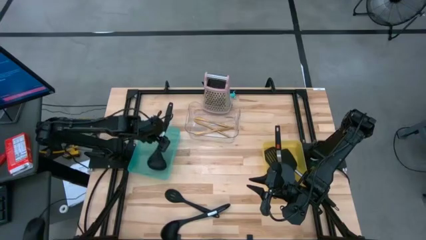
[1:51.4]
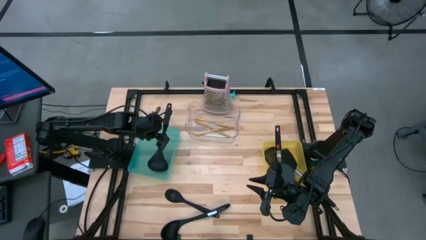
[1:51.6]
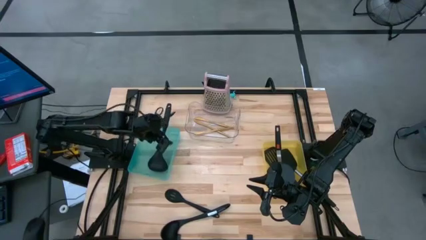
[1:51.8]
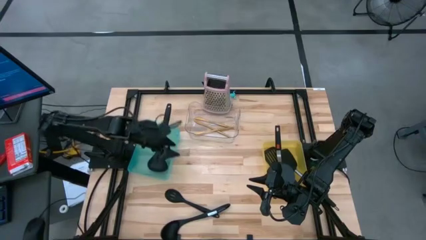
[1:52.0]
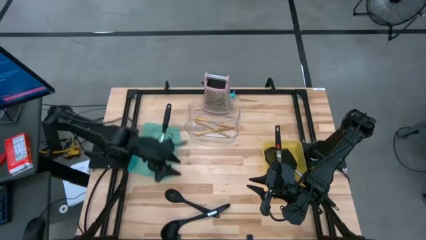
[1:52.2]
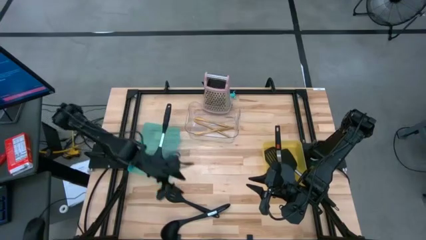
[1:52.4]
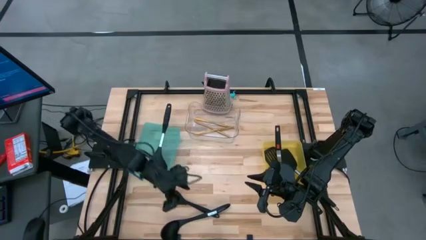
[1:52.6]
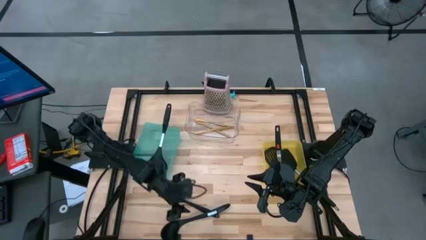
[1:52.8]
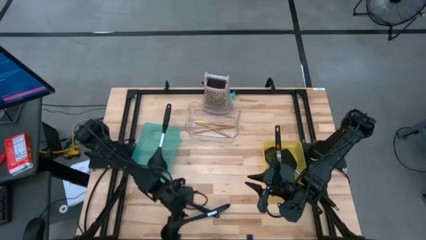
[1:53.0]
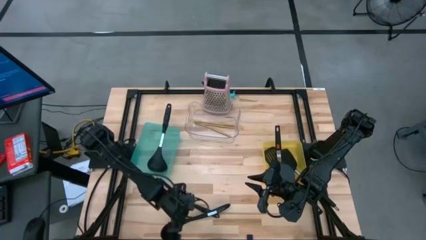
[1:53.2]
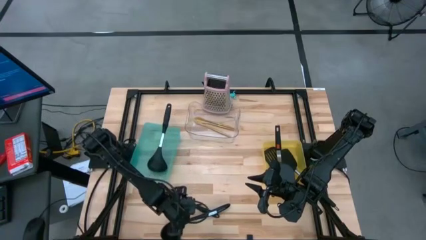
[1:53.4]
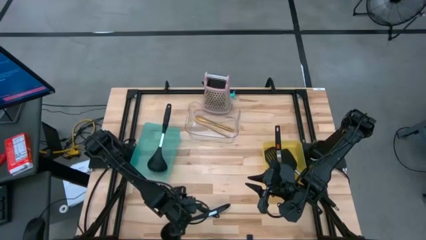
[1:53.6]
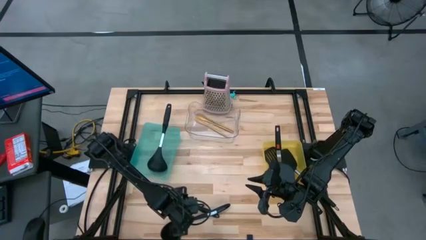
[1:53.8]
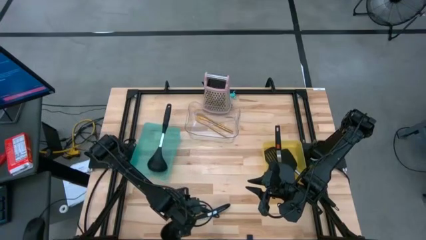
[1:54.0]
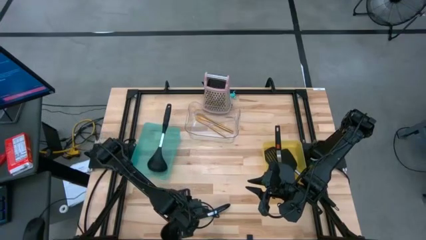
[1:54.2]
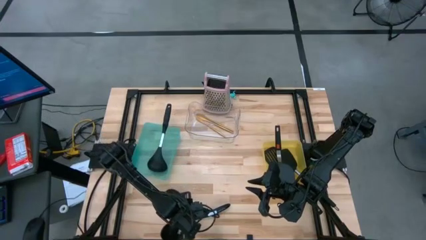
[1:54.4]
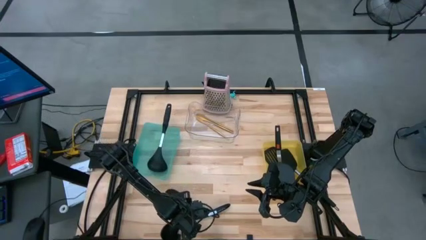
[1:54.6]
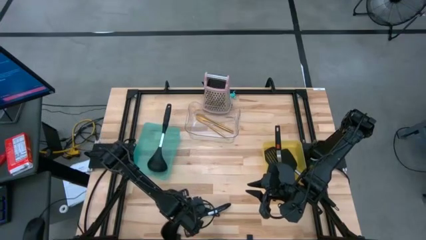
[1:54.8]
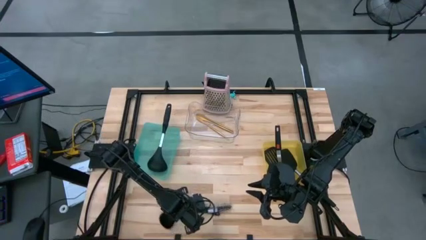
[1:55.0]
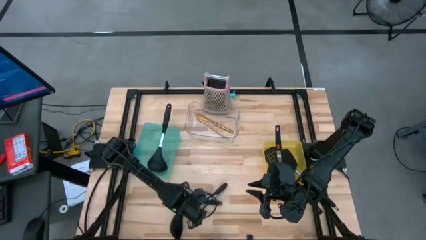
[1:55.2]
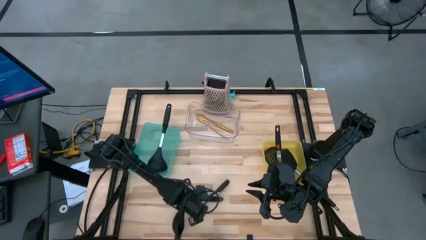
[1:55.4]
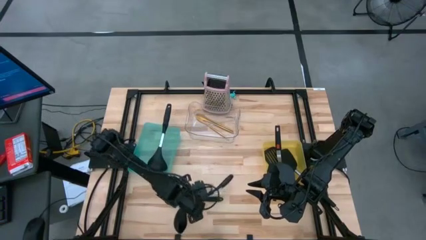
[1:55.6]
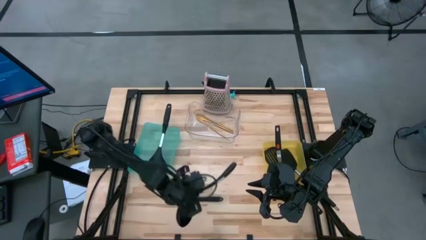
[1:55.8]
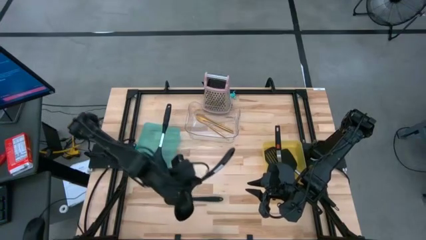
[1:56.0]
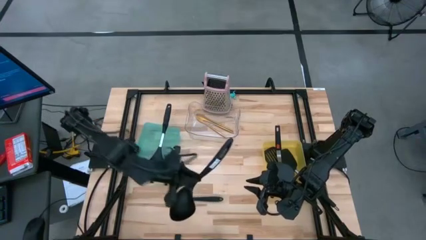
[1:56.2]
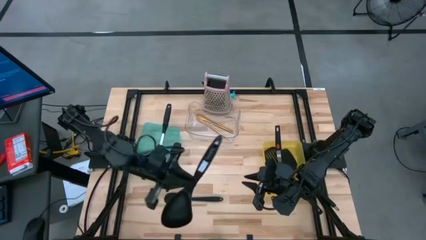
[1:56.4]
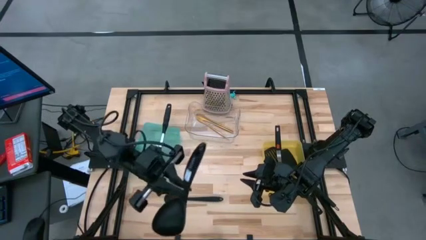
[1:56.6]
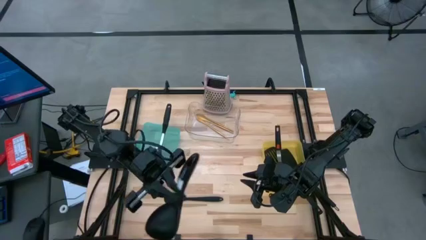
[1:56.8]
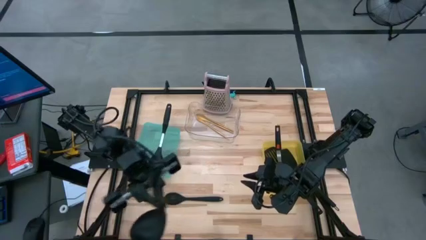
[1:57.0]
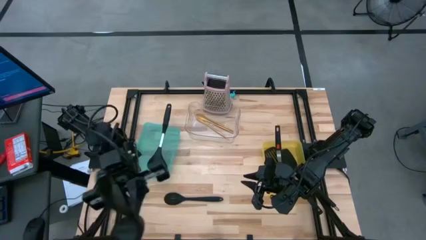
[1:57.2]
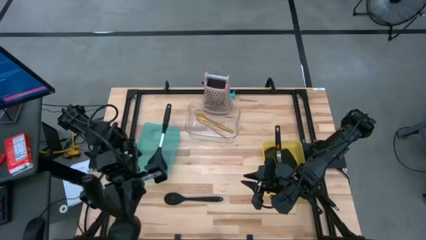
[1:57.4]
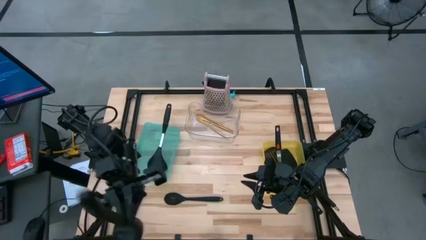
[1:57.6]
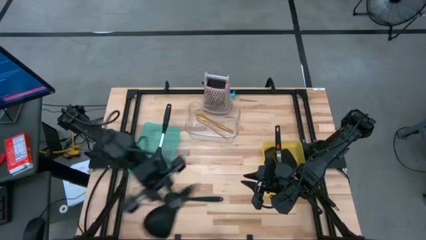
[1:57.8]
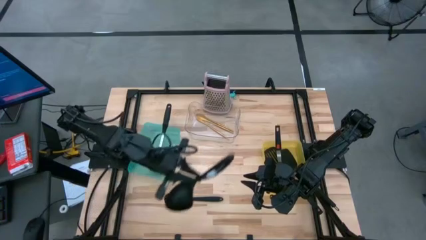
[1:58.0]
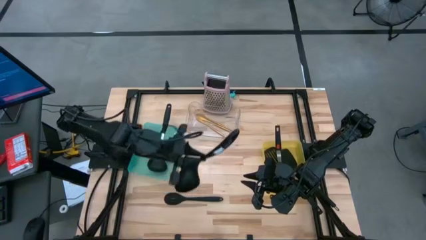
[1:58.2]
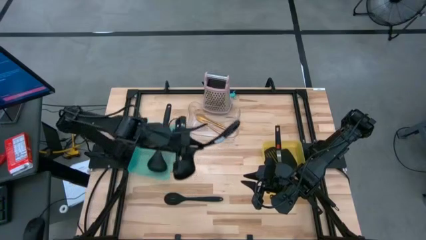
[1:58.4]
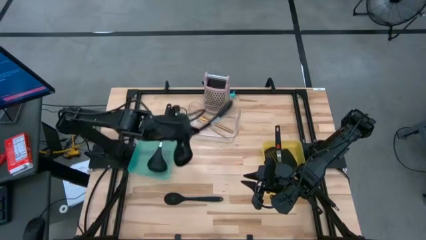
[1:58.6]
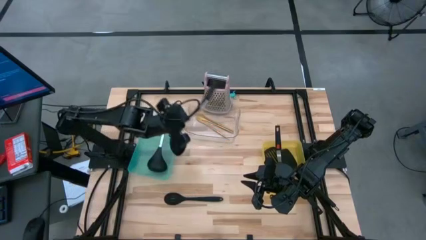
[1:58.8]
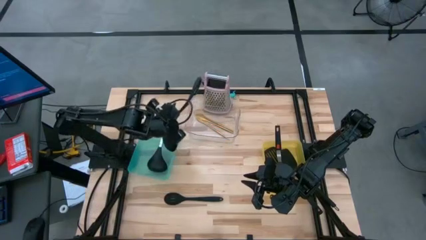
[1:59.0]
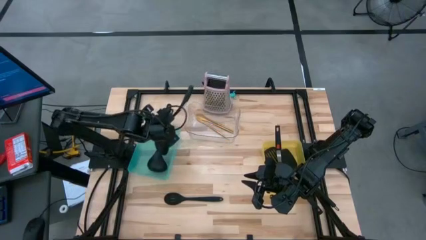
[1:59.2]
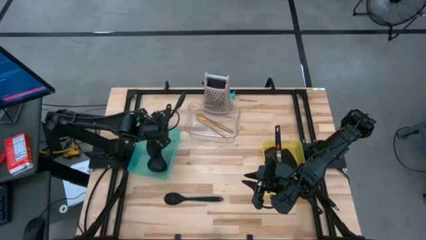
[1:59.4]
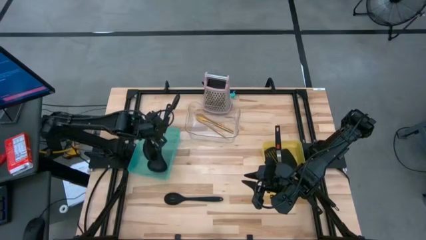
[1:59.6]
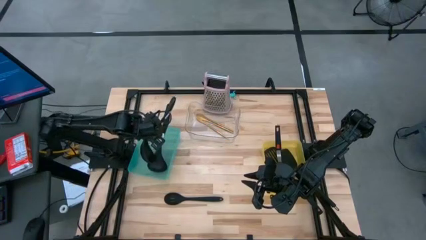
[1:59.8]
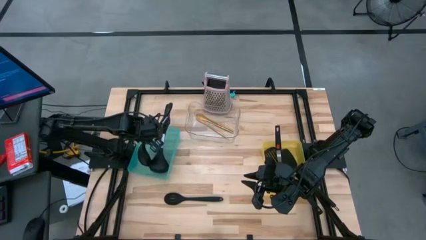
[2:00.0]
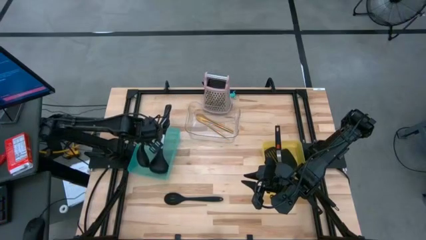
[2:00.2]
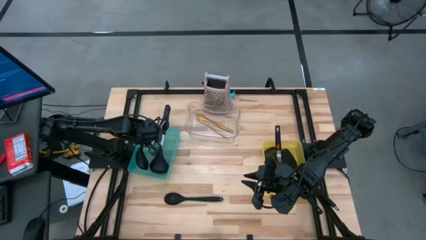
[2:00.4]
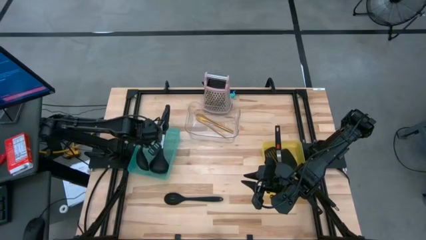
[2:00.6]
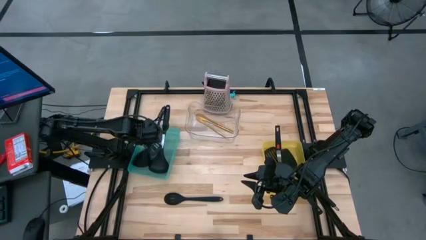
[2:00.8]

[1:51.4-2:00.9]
Task: Pick & Place Kitchen Items
Put the black spoon into the green bin

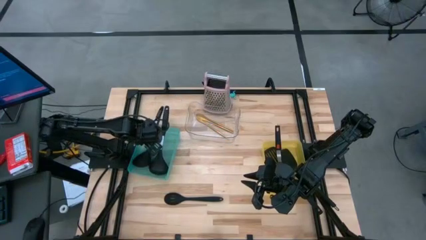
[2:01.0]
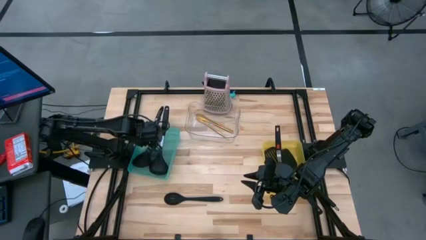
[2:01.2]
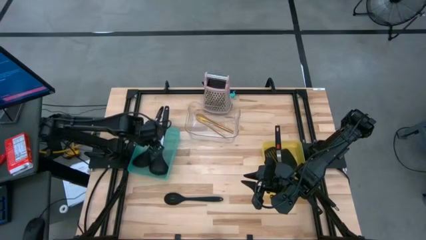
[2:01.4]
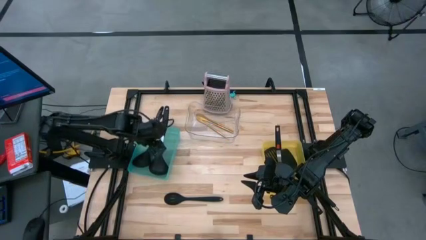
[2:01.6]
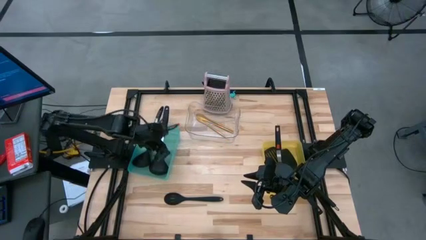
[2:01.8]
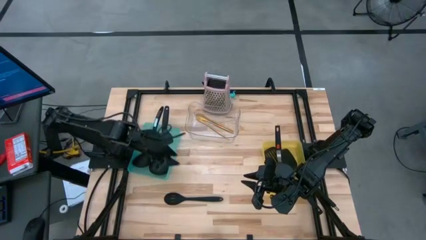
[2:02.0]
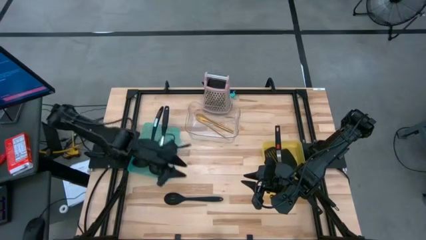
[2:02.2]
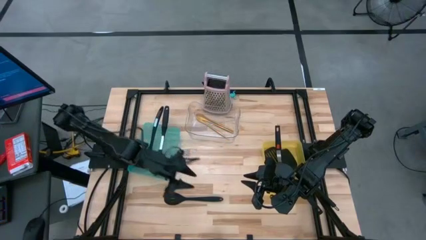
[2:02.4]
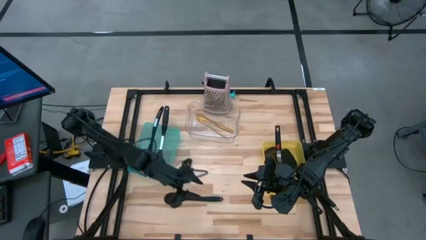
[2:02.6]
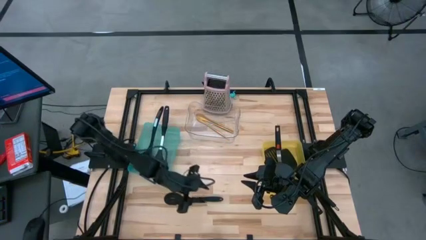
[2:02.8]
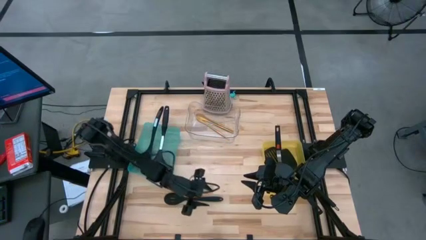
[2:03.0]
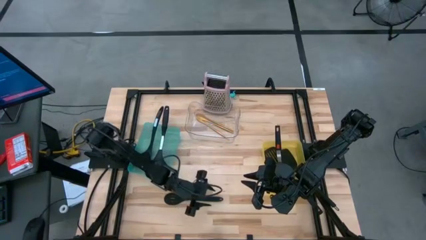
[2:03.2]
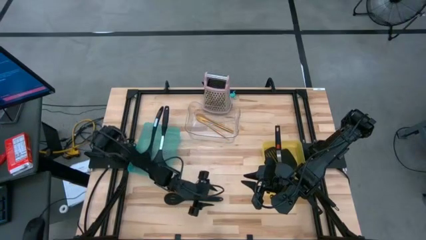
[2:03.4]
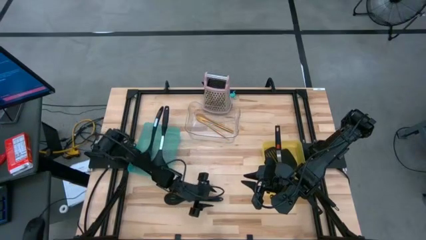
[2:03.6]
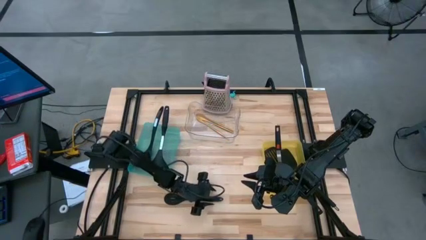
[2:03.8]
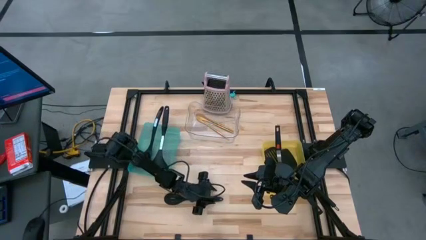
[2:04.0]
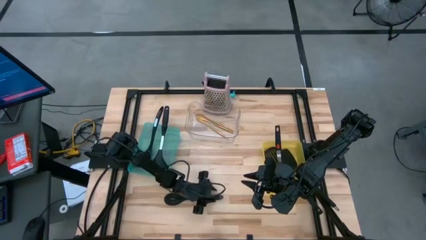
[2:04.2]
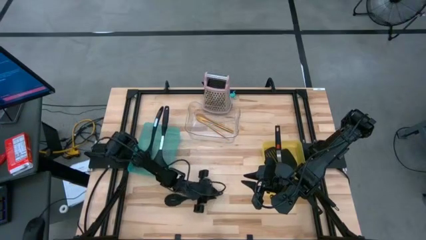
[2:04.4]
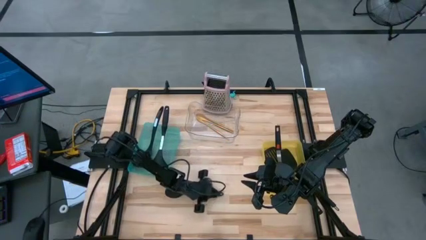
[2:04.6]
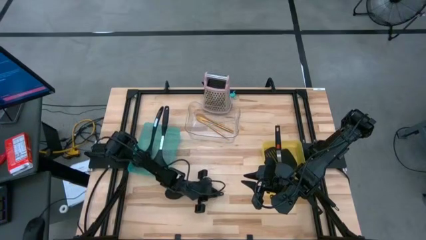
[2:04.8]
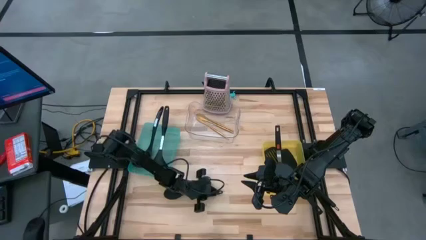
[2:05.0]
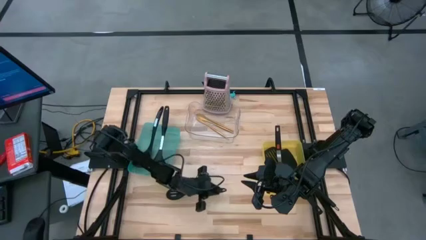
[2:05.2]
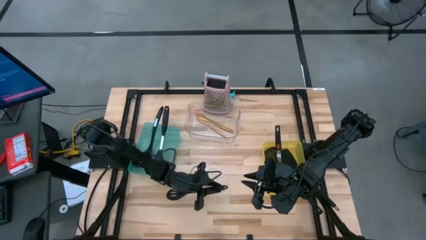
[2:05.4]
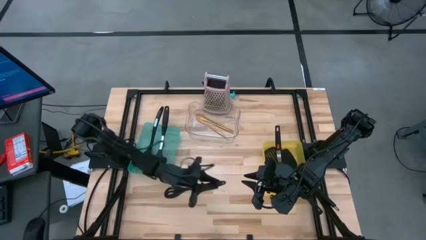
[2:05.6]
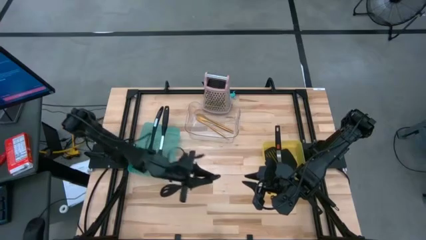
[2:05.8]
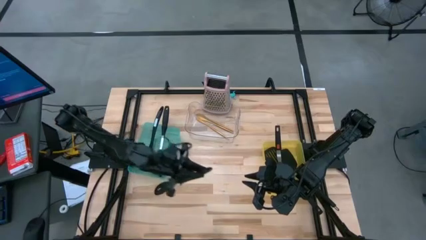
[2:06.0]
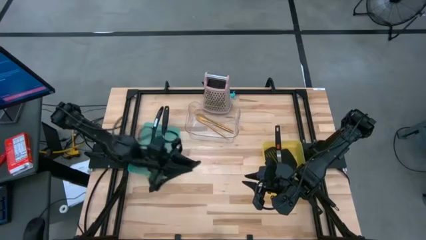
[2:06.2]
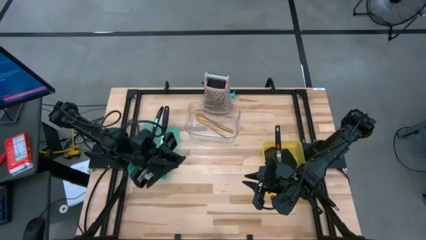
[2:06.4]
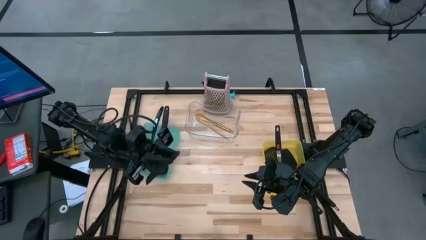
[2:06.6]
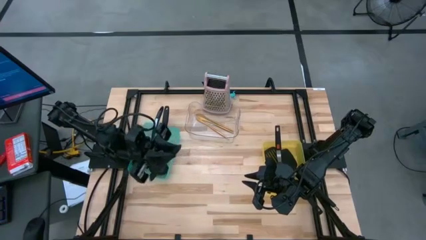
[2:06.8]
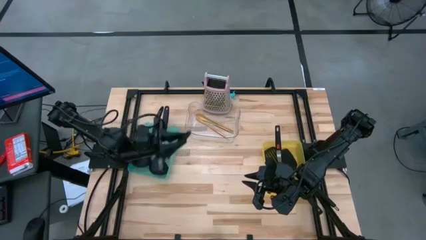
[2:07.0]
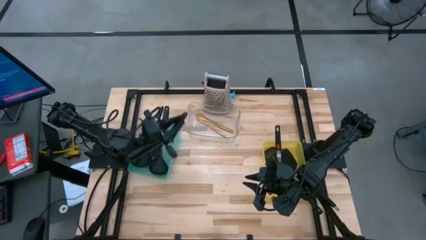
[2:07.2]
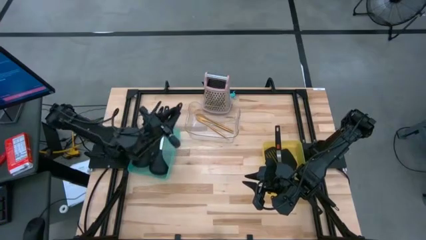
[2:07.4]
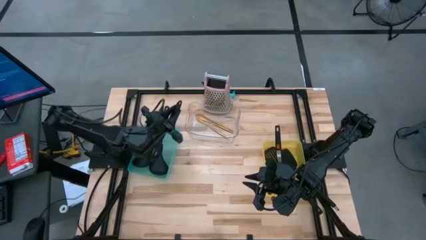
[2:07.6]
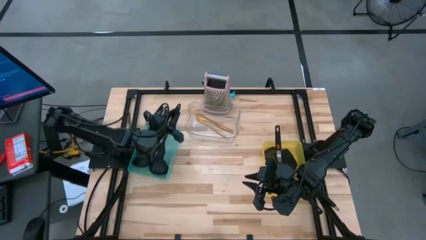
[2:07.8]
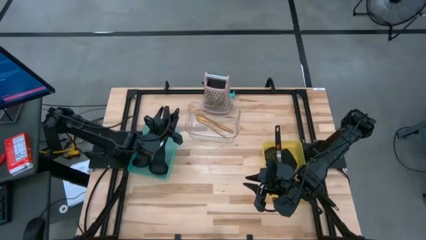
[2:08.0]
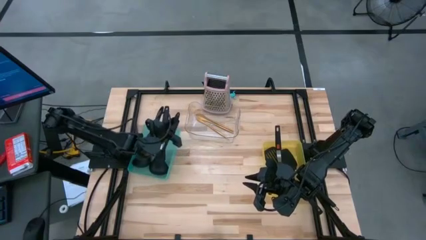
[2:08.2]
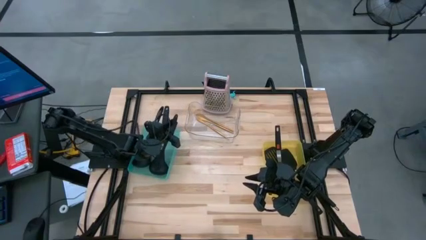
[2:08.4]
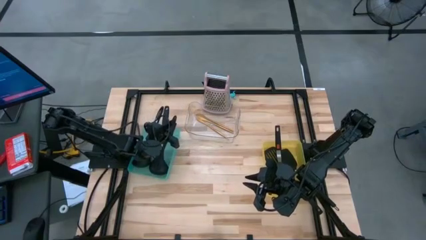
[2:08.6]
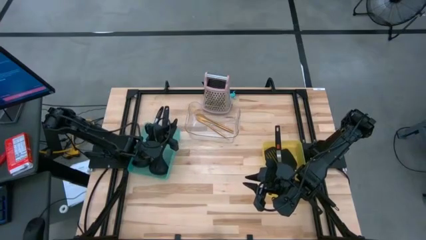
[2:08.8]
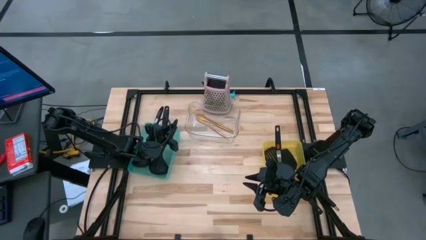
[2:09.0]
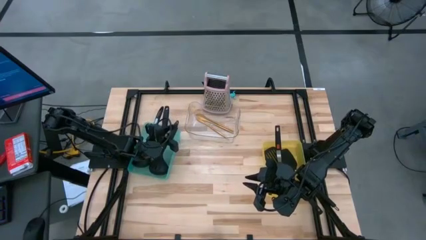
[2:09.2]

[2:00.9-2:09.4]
Put the black spoon into the green bin
